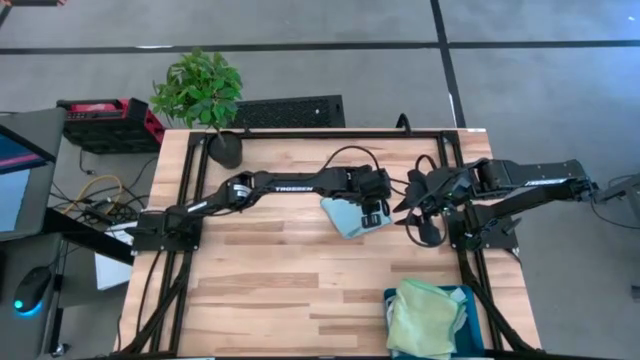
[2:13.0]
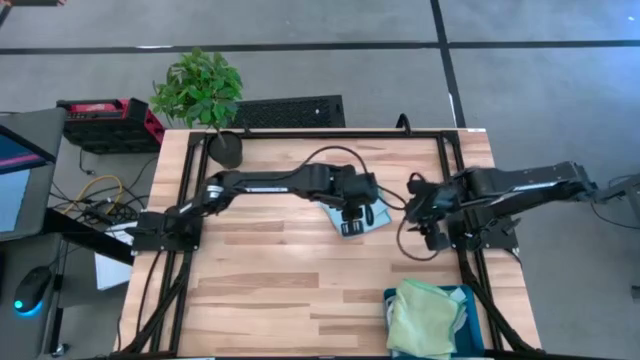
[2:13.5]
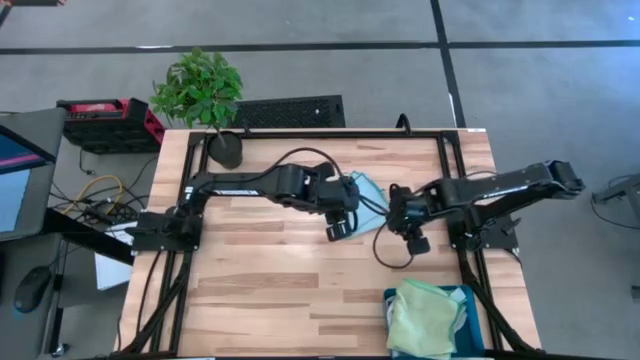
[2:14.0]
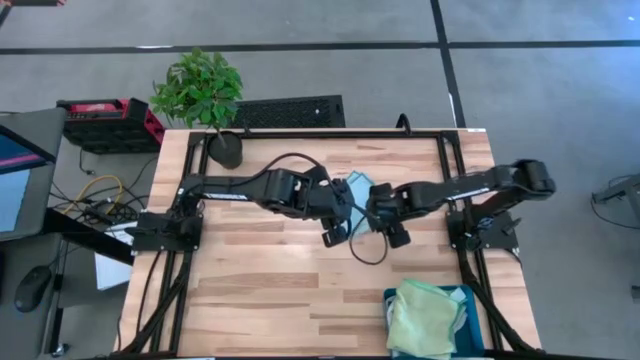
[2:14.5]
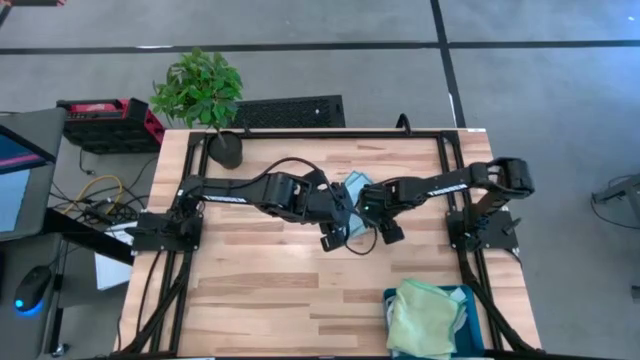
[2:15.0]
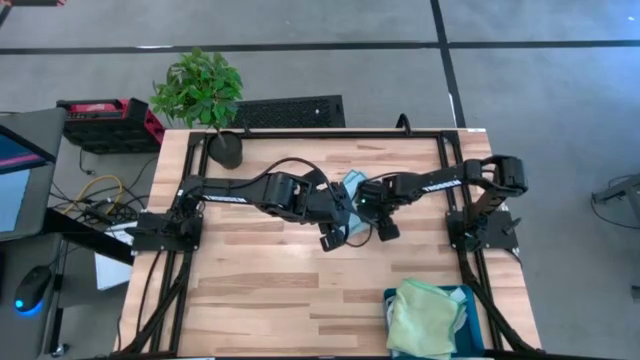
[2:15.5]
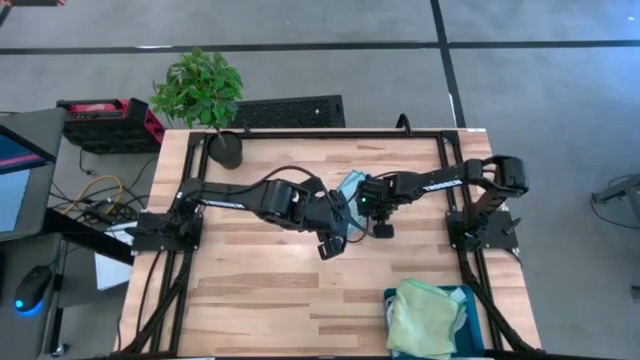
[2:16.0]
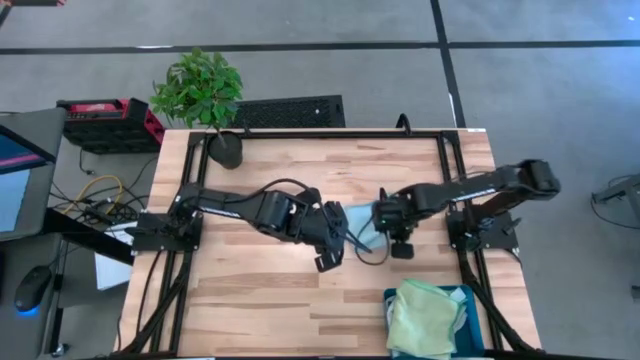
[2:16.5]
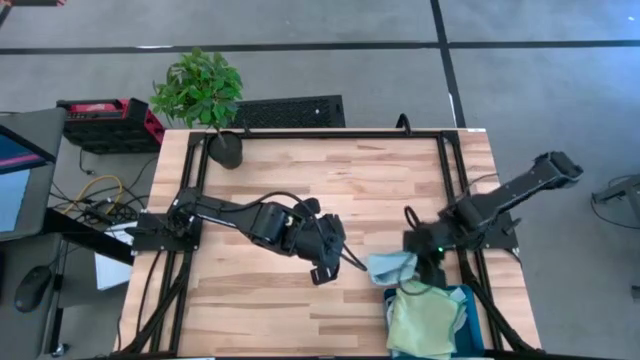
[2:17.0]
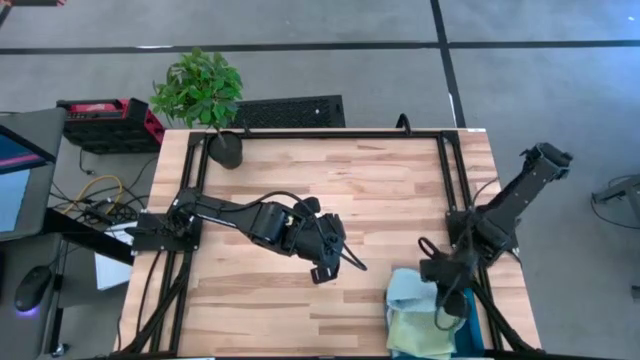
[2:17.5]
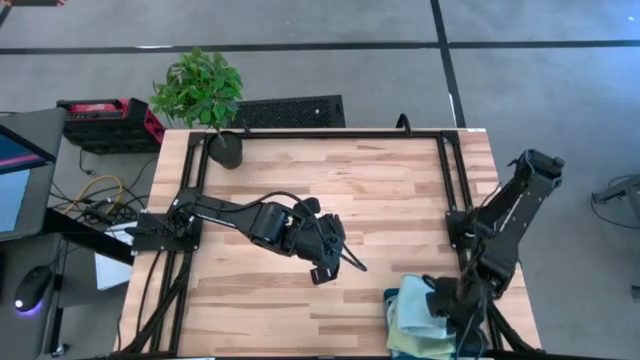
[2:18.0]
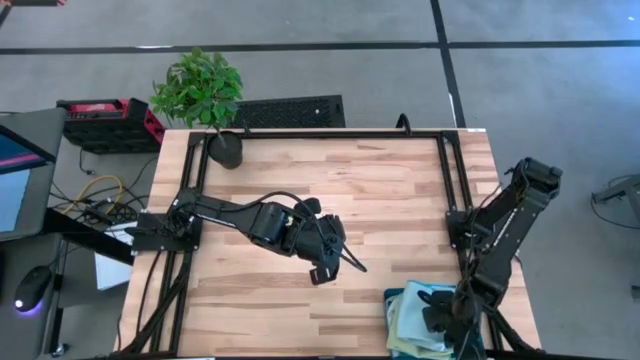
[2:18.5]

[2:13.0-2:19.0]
Task: Fold microfiber towels
Put the folded blue microfiber towel into the blue bin

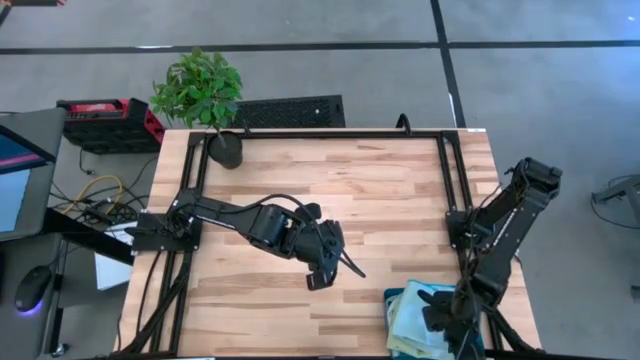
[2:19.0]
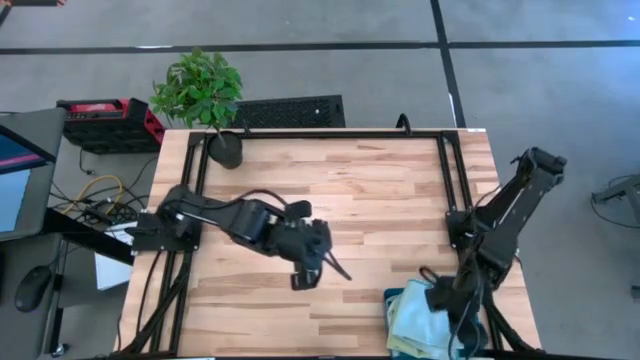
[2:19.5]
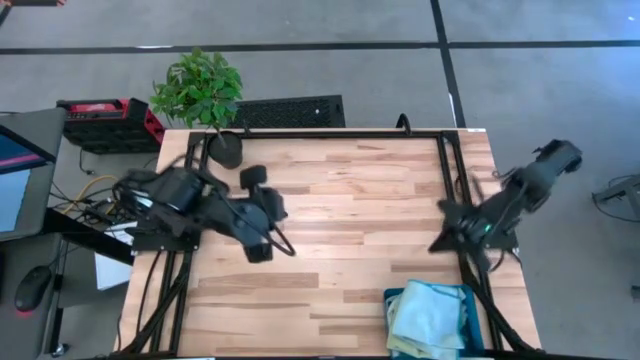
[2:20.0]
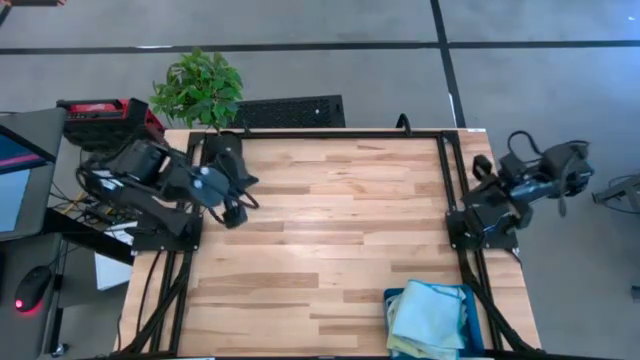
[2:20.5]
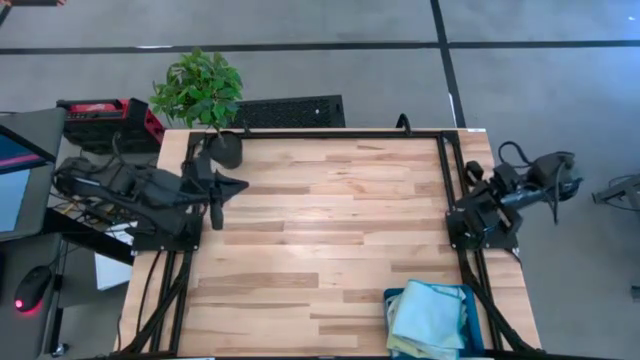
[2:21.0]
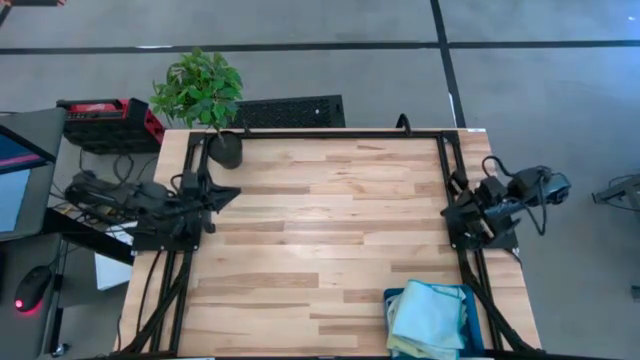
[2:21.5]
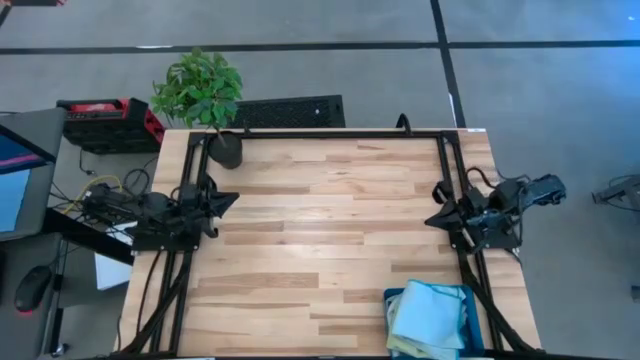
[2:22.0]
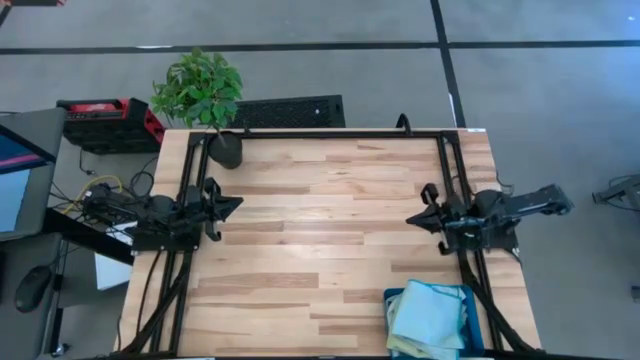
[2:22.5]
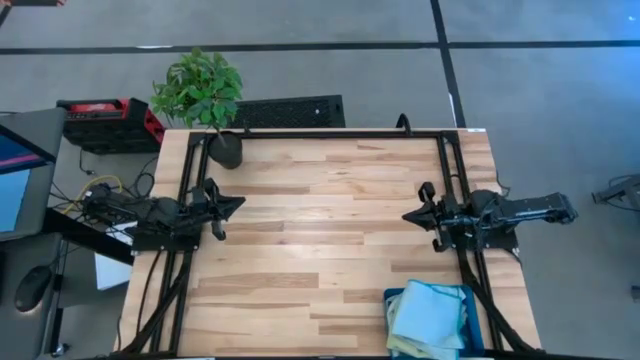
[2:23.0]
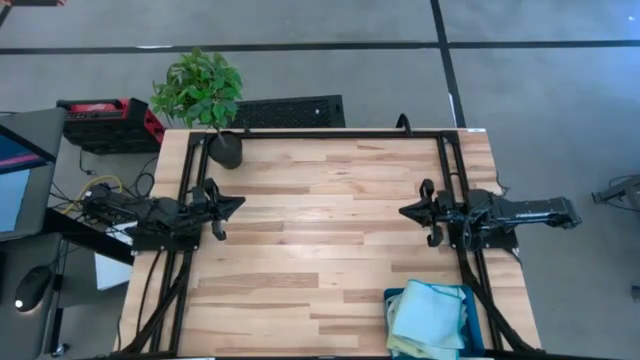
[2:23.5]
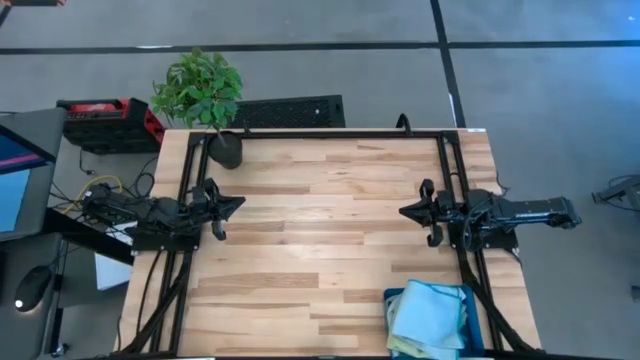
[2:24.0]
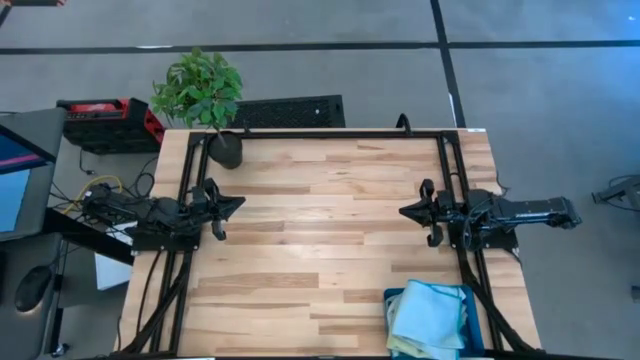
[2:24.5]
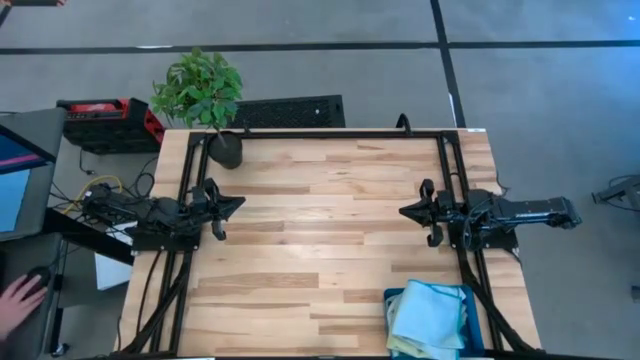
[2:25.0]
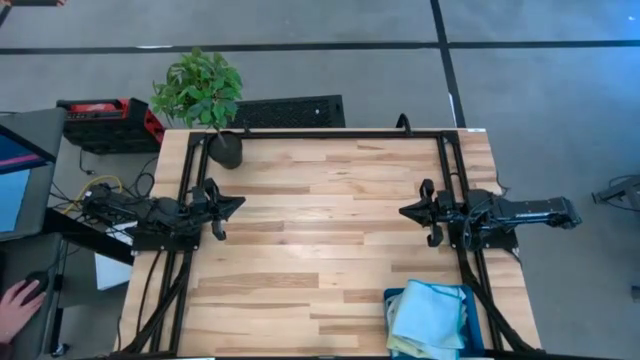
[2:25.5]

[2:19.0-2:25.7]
Return to Home Position

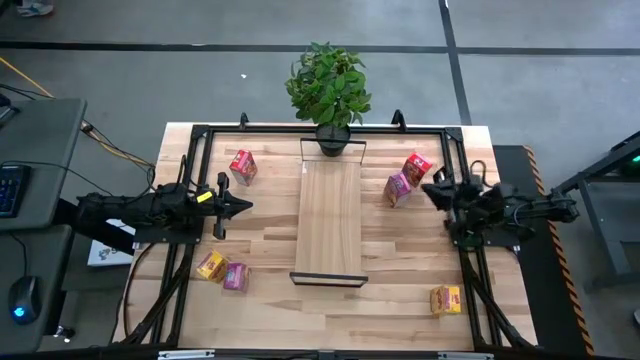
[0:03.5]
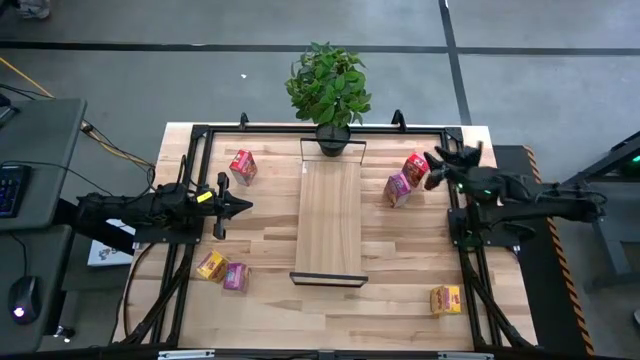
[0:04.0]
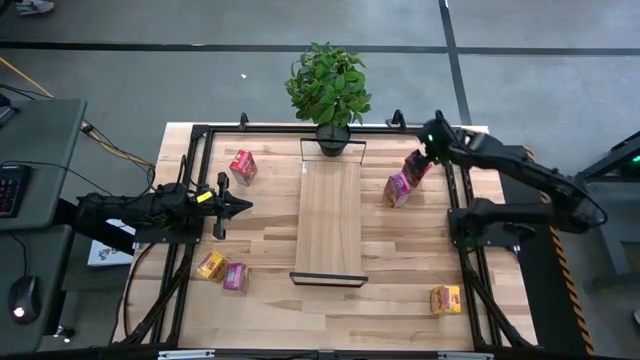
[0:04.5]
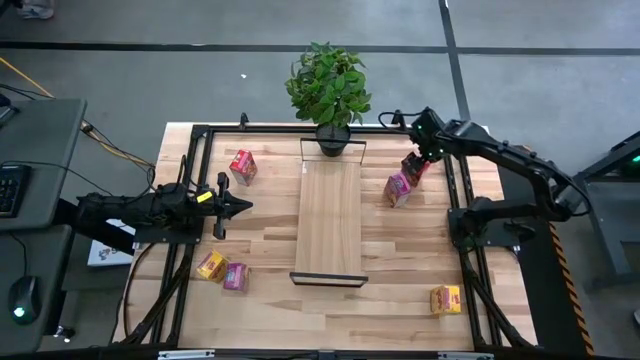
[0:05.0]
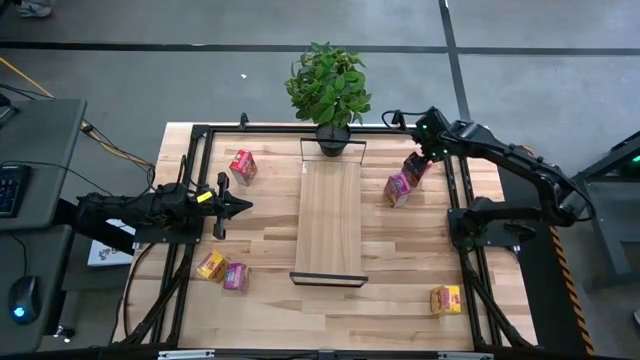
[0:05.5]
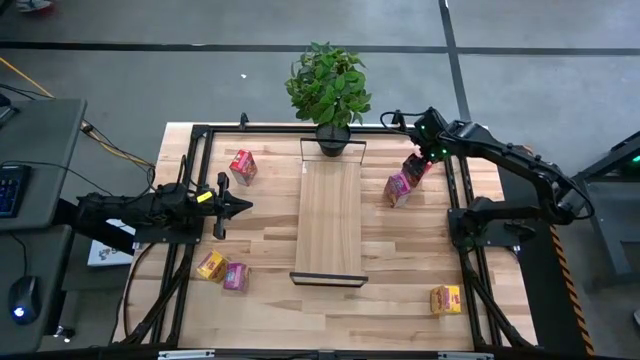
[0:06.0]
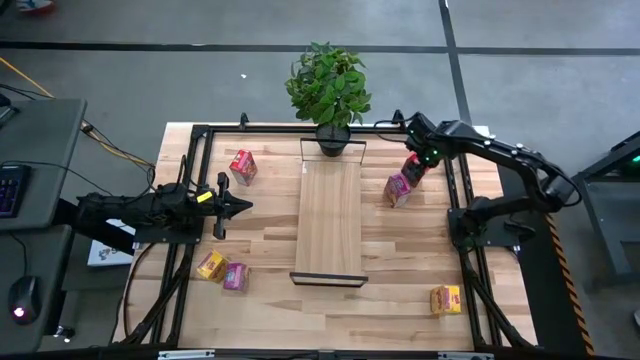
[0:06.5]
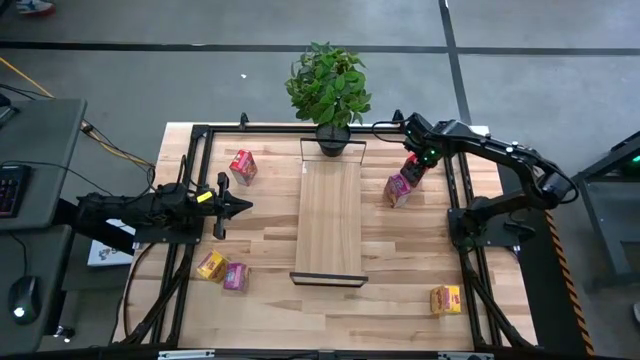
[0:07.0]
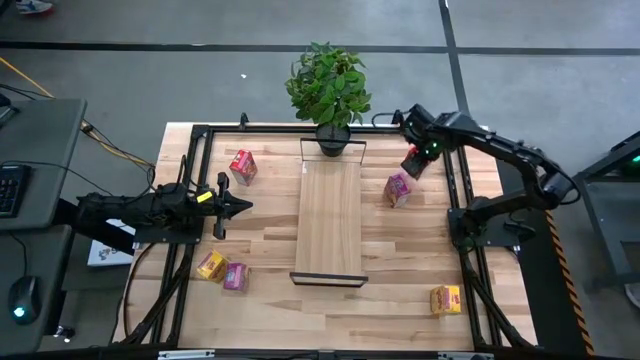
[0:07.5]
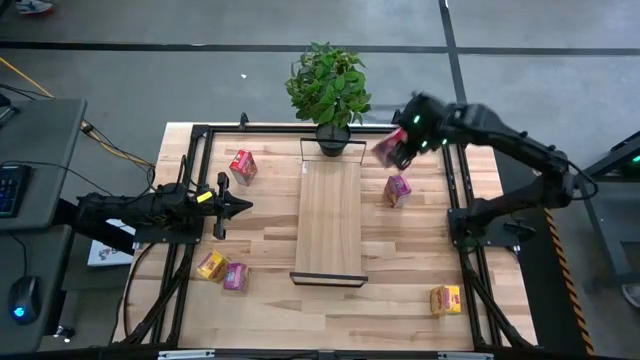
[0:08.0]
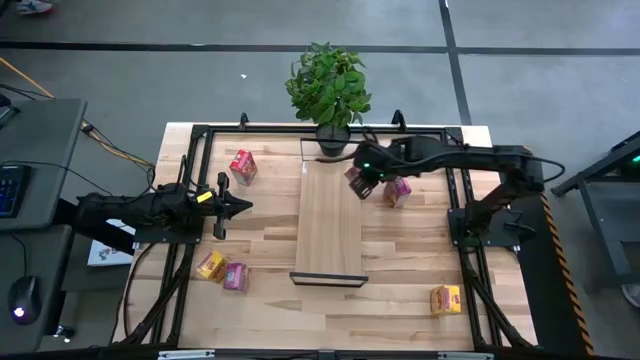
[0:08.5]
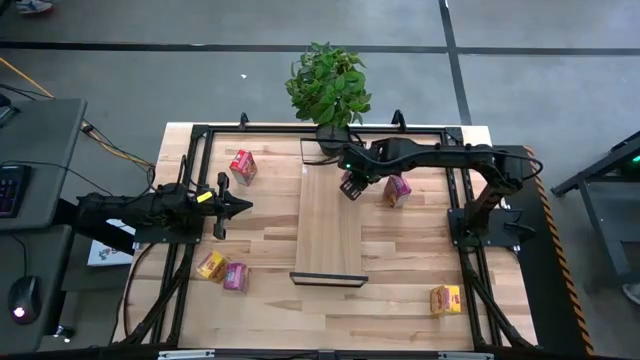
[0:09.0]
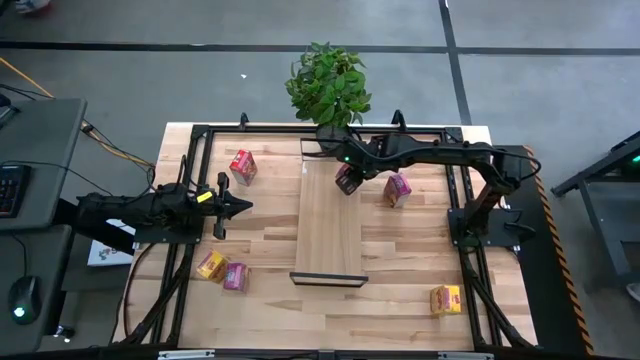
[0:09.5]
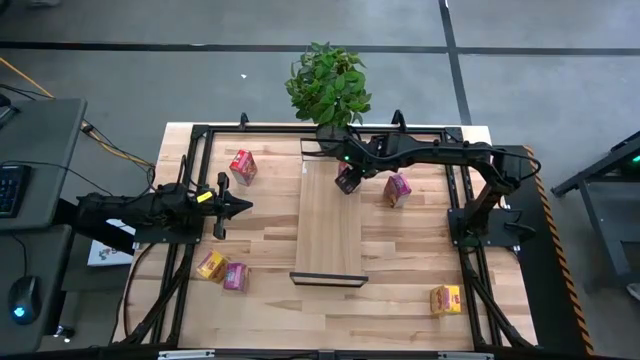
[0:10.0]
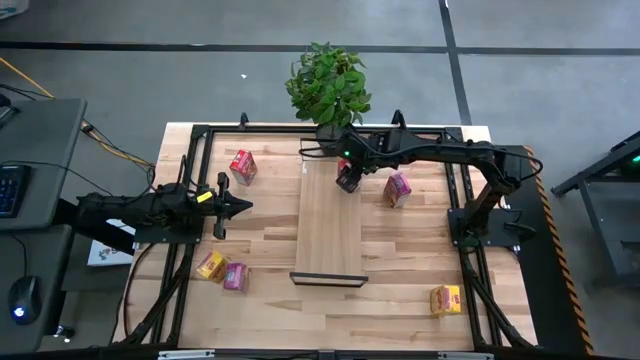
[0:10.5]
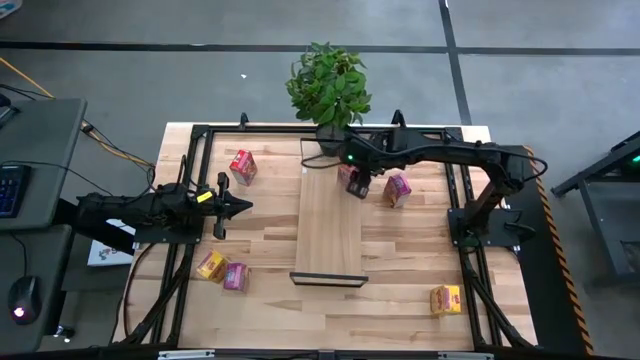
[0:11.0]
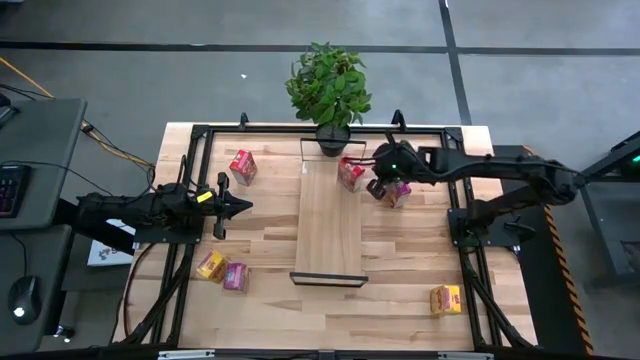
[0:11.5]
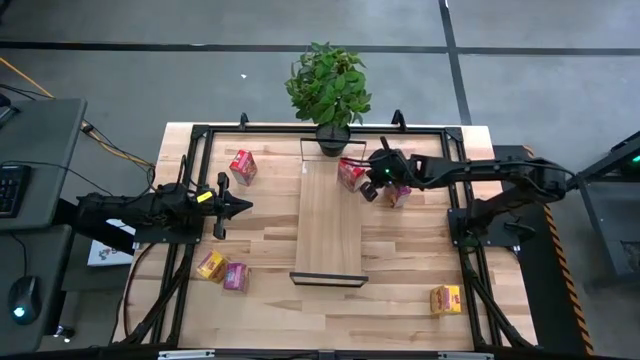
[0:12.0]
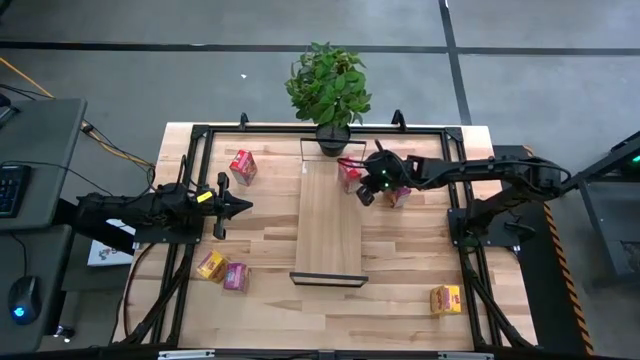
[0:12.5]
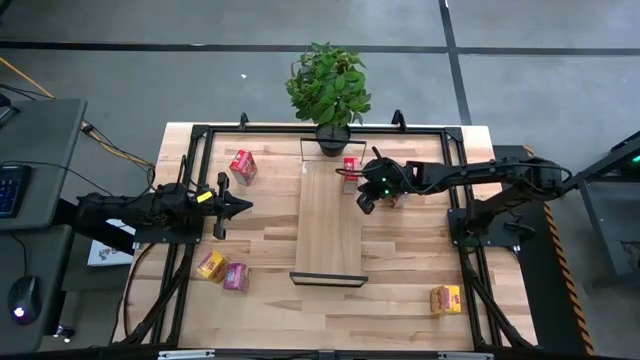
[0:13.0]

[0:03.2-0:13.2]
Task: Stack cereal on shelf
Put the right red cereal box on the shelf
